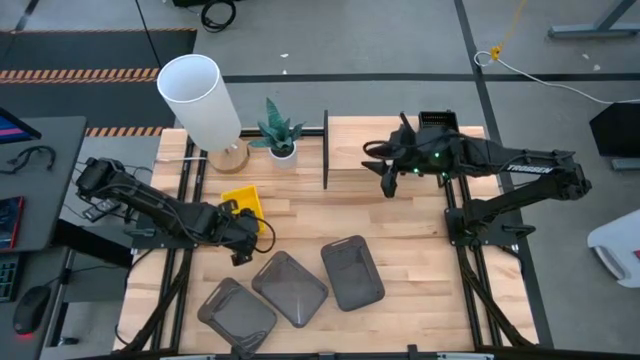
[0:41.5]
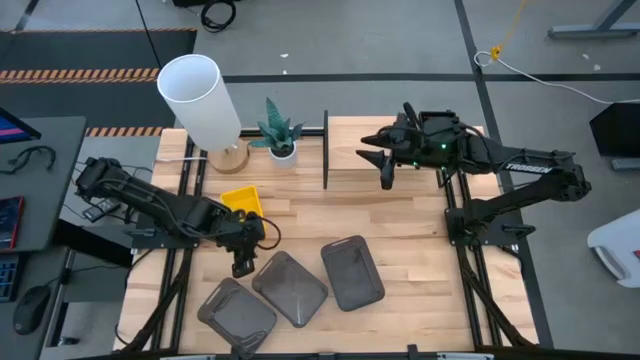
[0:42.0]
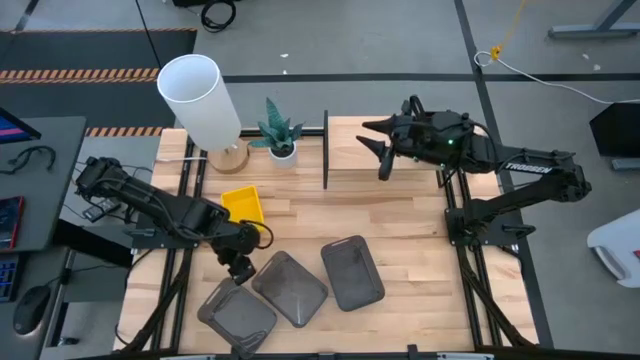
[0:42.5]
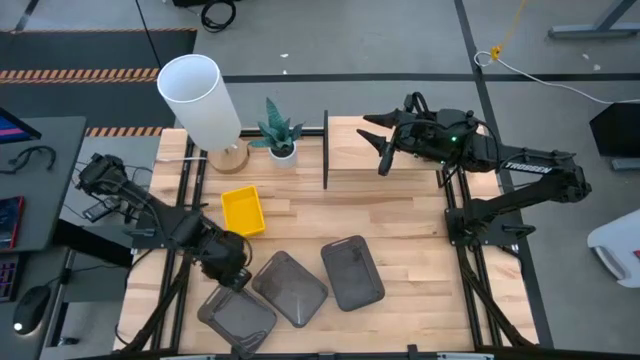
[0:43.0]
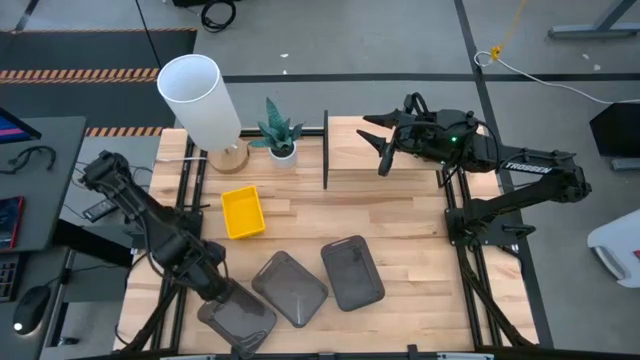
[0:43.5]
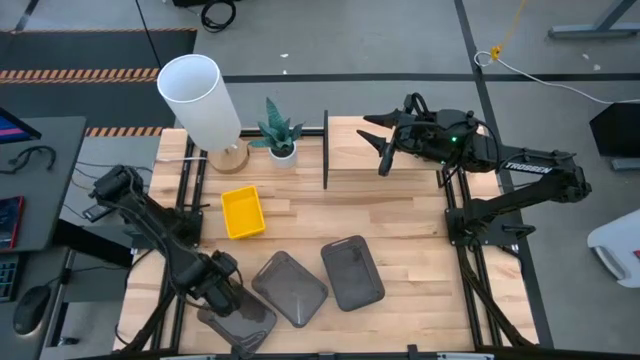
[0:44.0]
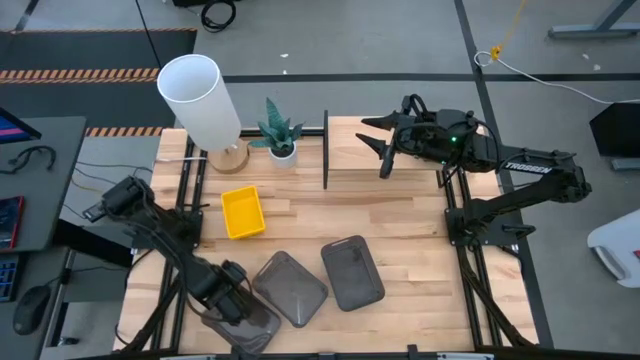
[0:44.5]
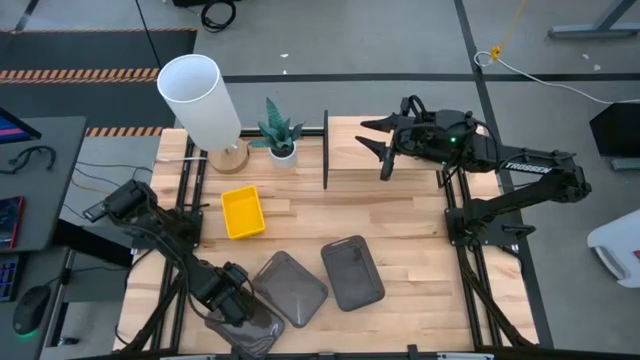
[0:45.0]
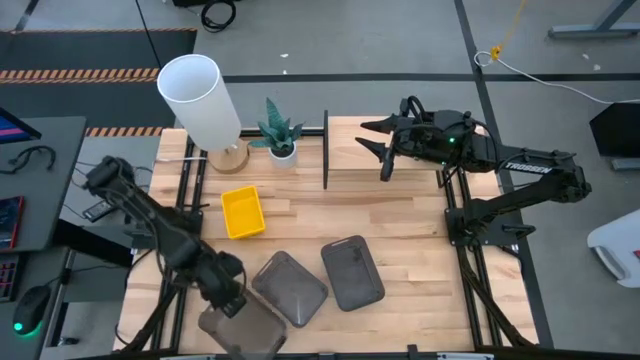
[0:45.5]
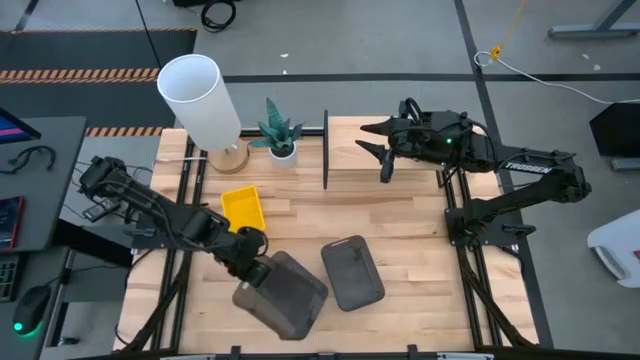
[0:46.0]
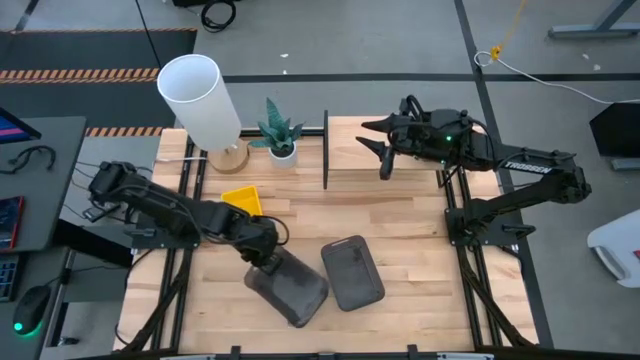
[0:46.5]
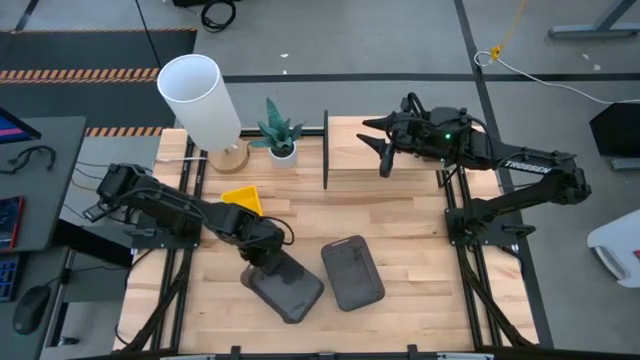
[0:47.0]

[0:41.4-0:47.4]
Task: Stack baskets on shelf by color
Stack the left gray bin on the middle gray bin

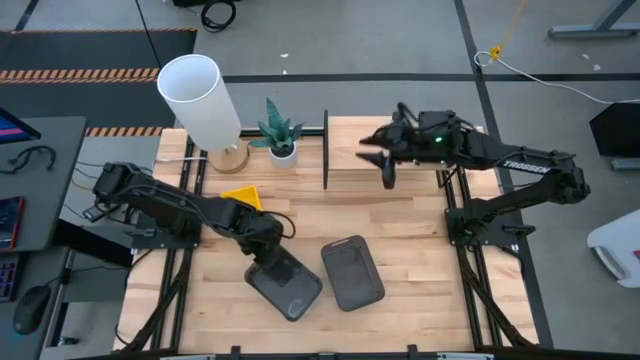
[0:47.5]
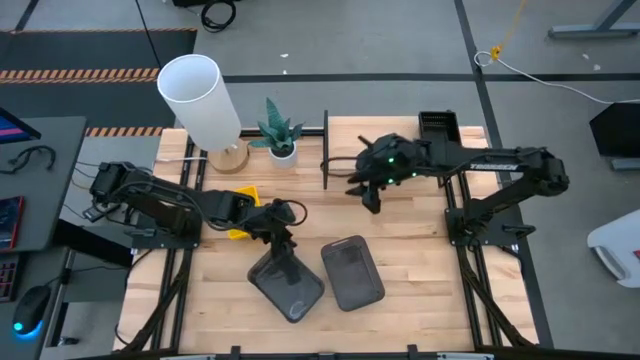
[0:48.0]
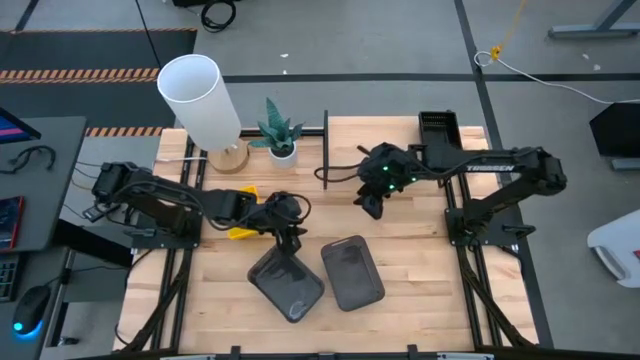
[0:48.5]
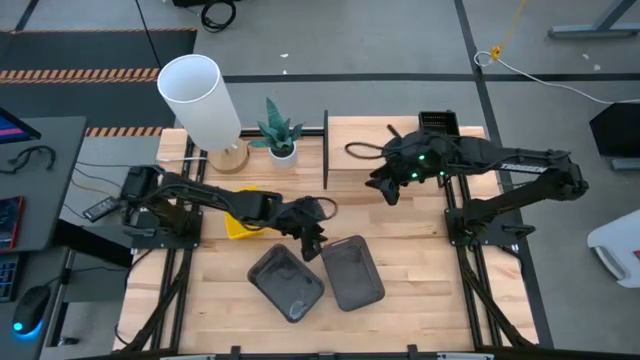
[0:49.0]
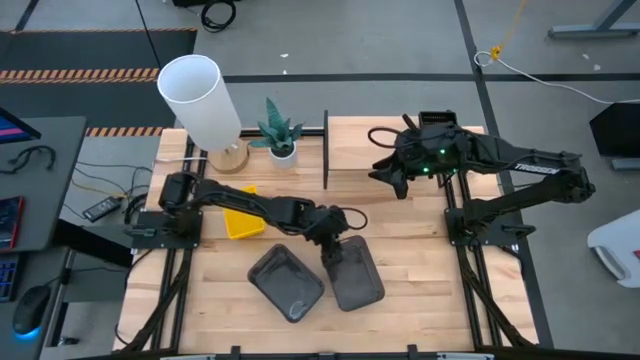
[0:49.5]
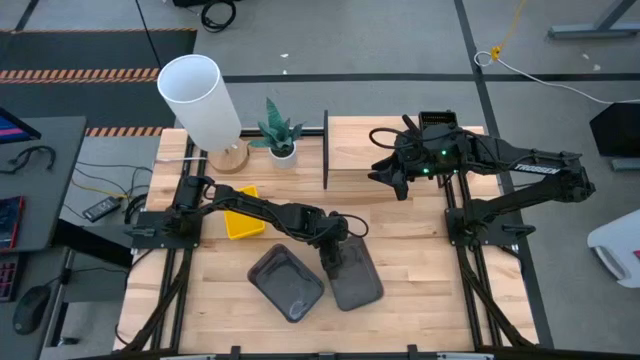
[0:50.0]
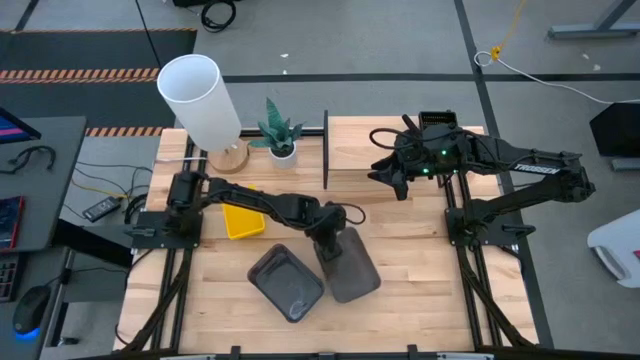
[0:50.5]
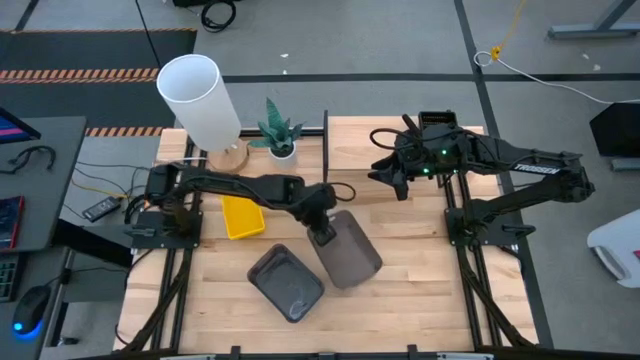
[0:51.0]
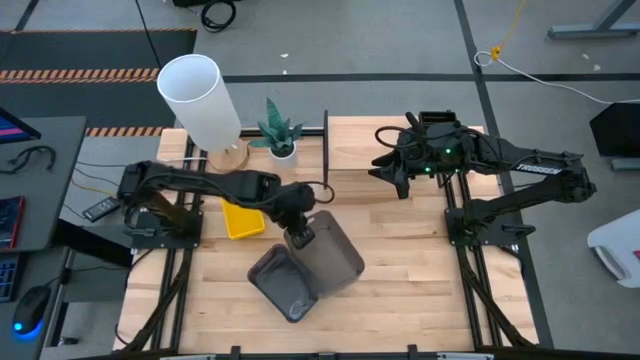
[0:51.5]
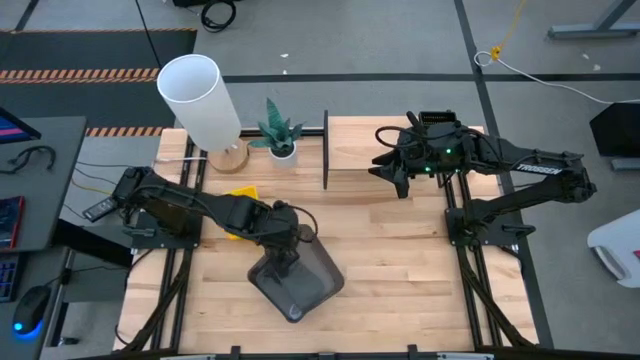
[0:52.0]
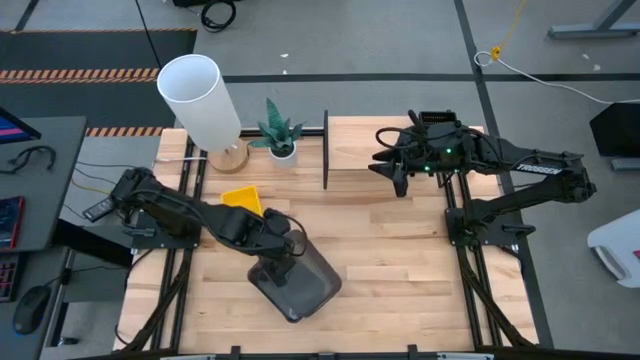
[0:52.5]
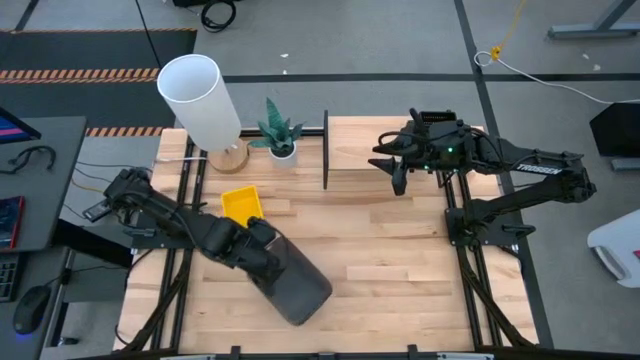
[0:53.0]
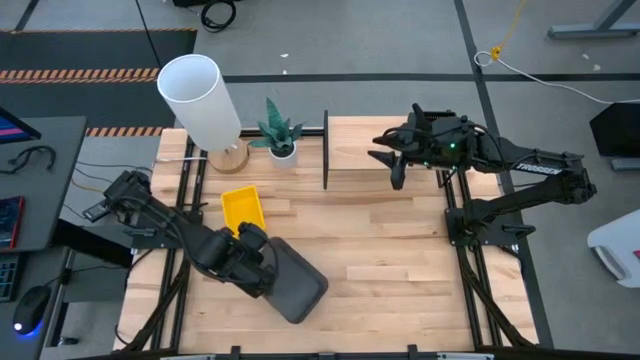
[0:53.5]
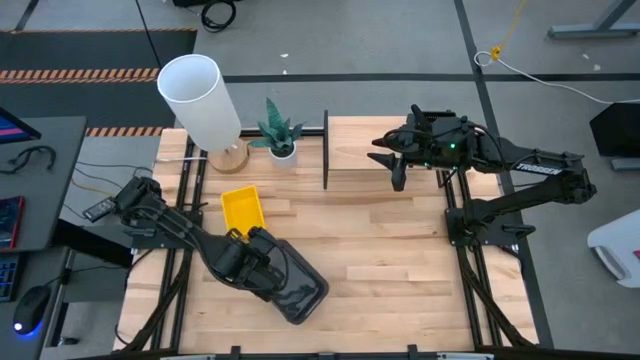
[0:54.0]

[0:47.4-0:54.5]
Stack the gray bin on the stacked gray bin

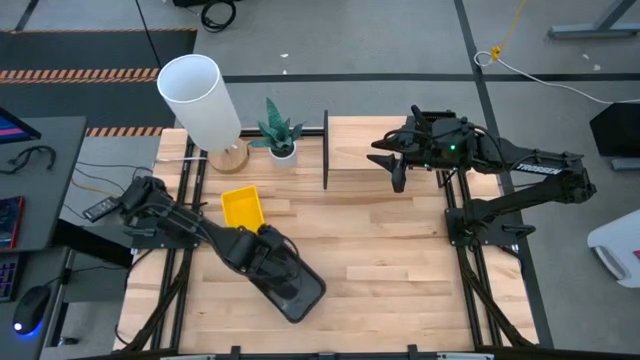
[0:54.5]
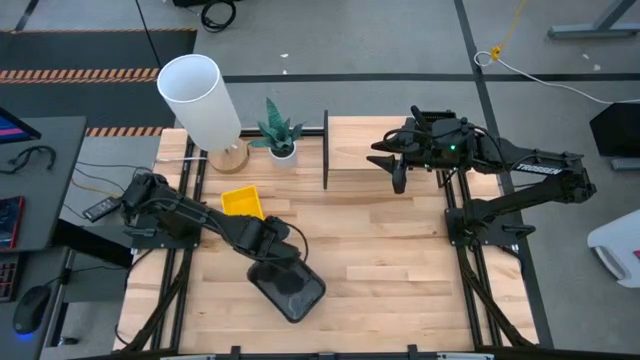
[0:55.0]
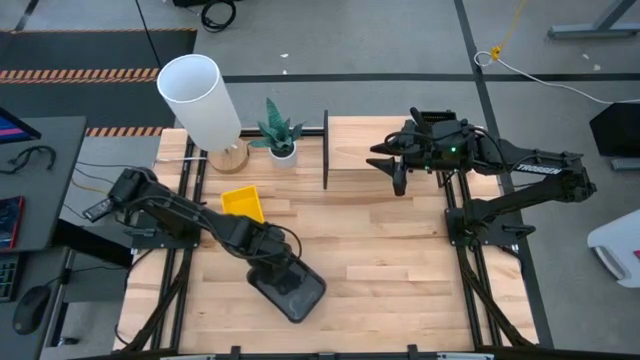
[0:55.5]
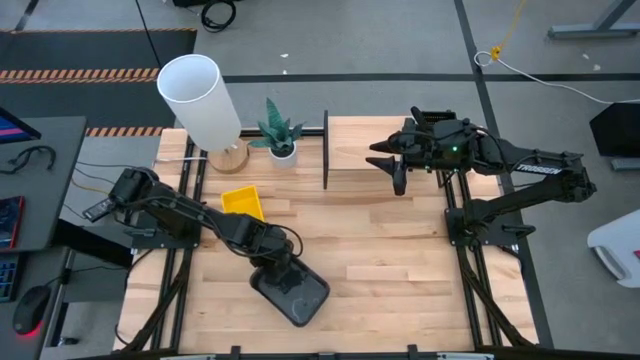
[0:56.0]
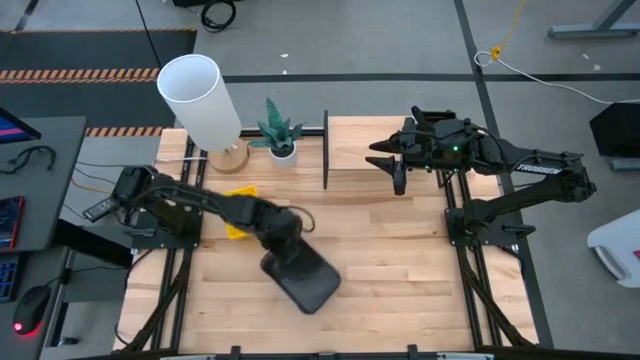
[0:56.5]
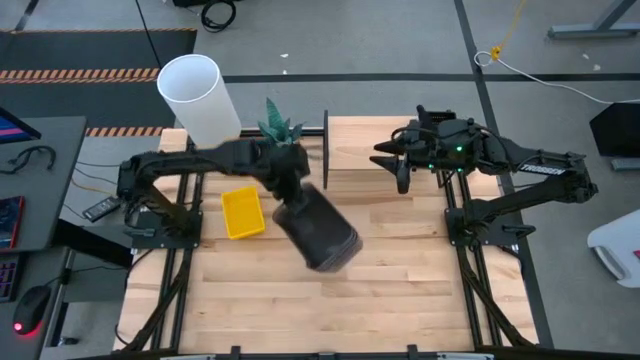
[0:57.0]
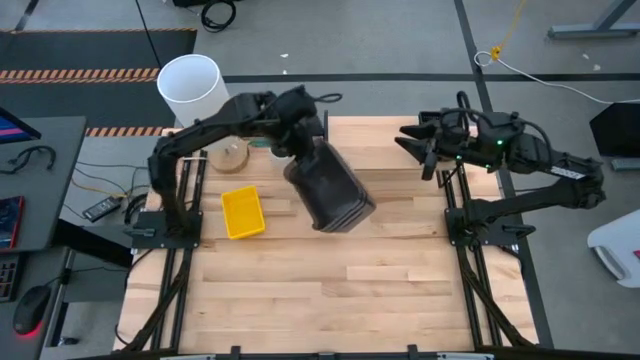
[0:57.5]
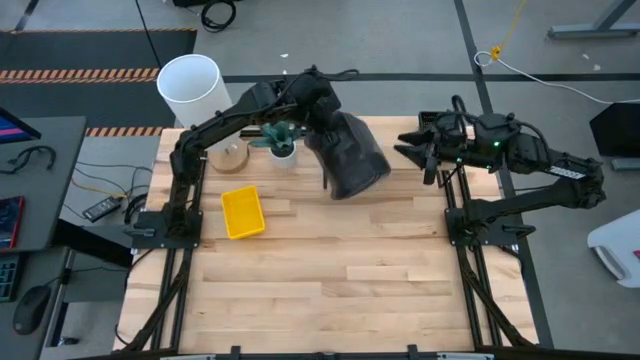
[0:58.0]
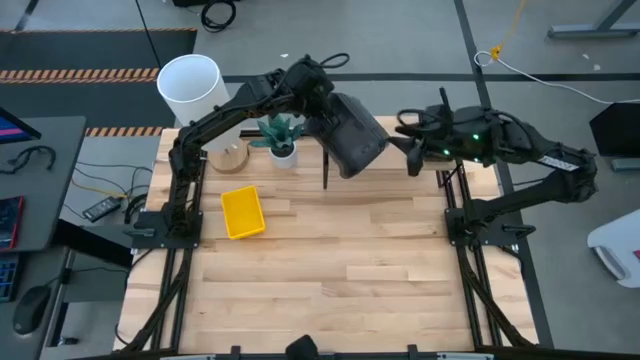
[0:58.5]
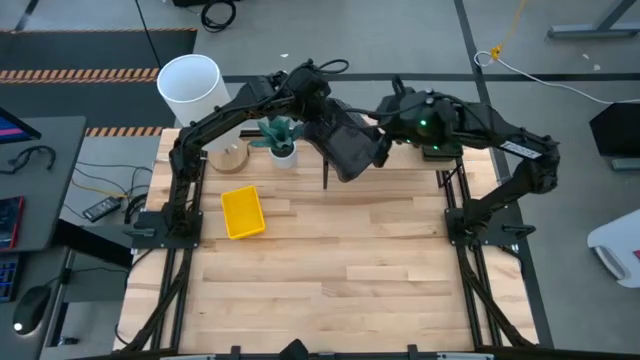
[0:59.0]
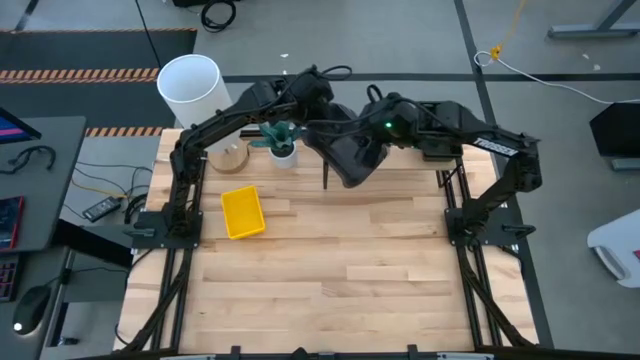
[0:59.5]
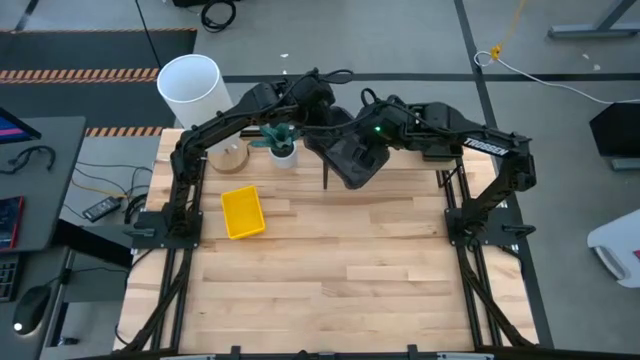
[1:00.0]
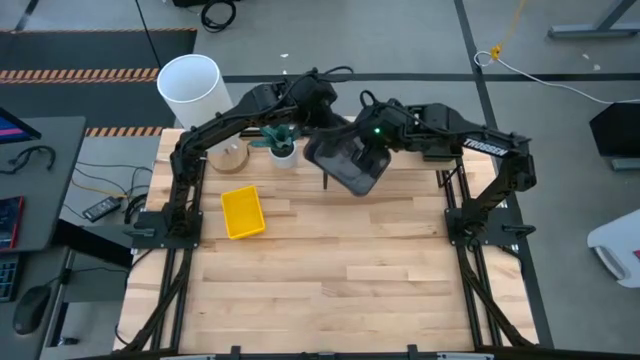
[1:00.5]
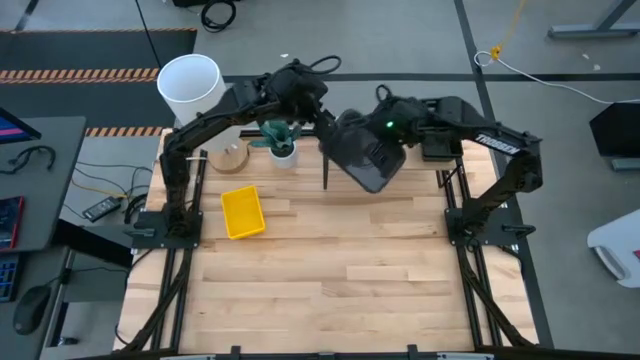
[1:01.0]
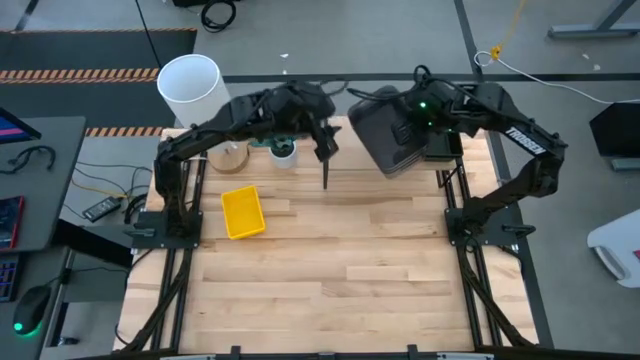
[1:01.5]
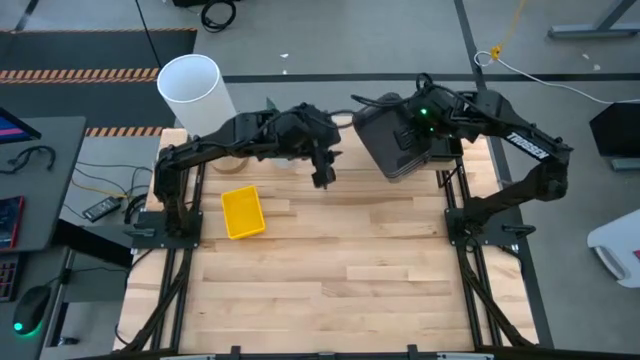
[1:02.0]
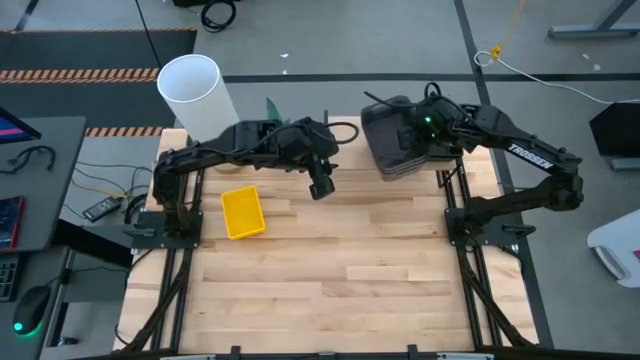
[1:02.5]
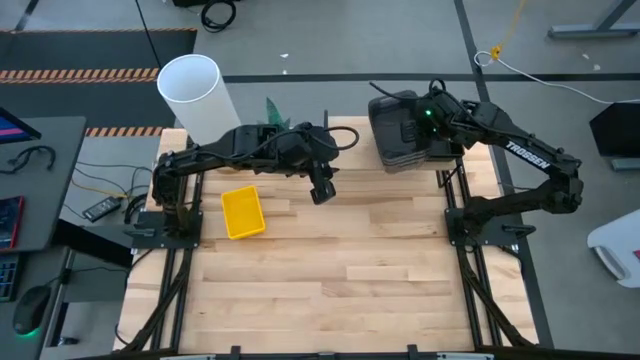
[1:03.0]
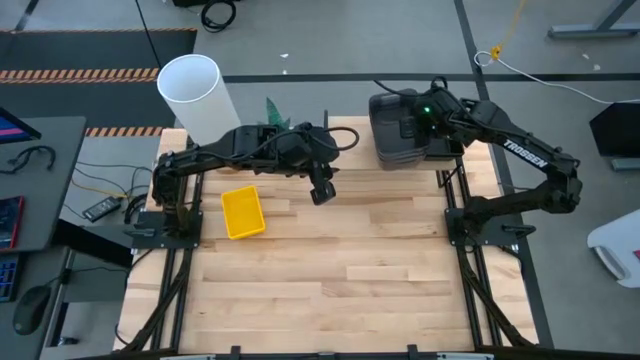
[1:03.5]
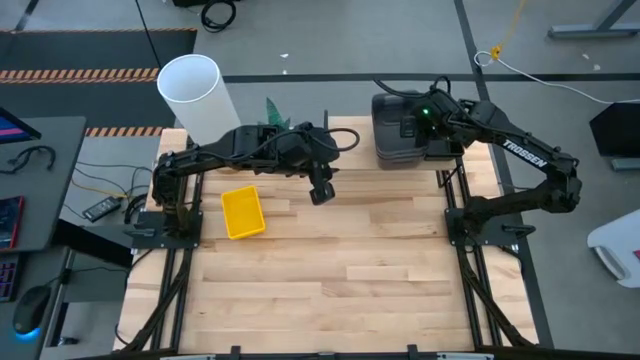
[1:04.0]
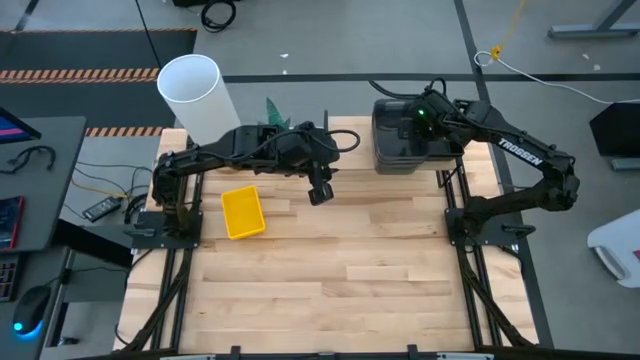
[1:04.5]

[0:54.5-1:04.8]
Put the stacked gray bins on the shelf
